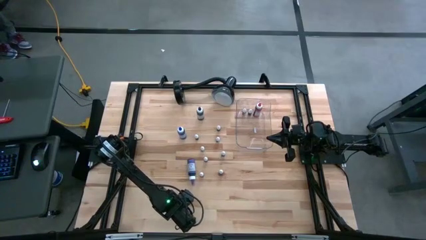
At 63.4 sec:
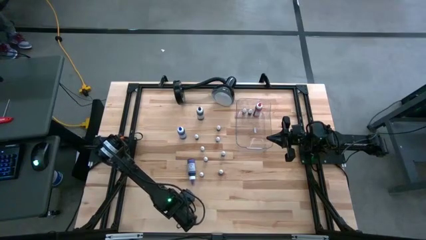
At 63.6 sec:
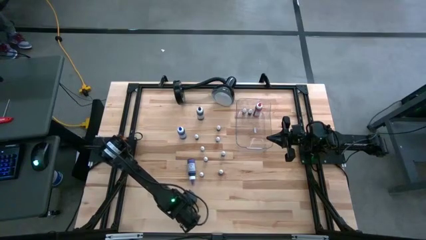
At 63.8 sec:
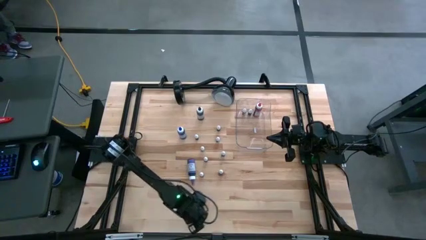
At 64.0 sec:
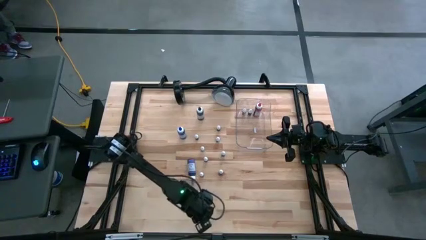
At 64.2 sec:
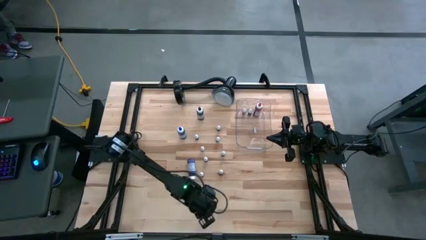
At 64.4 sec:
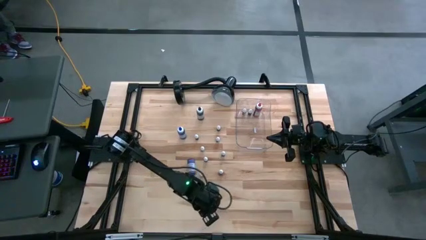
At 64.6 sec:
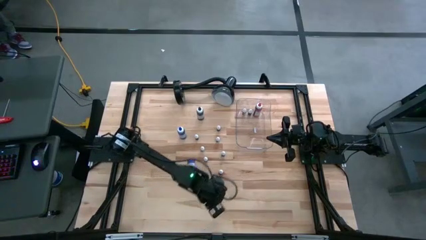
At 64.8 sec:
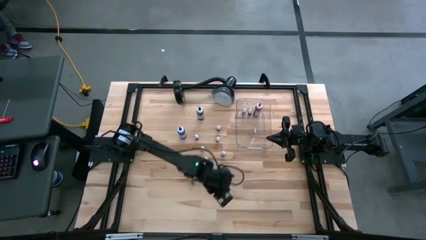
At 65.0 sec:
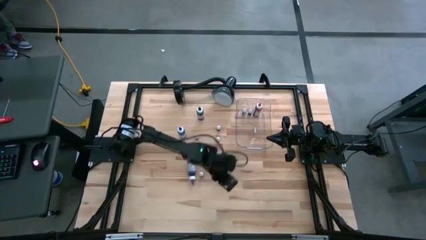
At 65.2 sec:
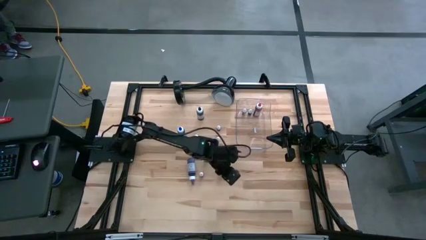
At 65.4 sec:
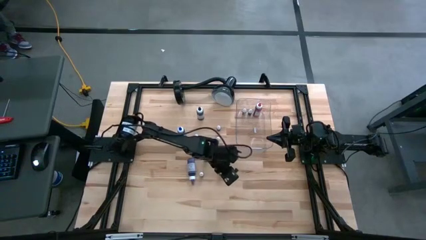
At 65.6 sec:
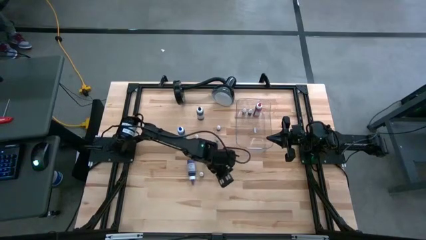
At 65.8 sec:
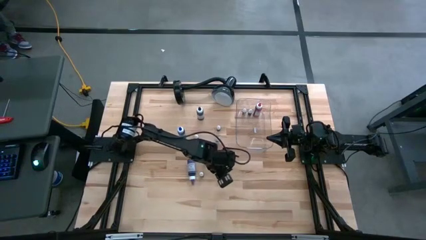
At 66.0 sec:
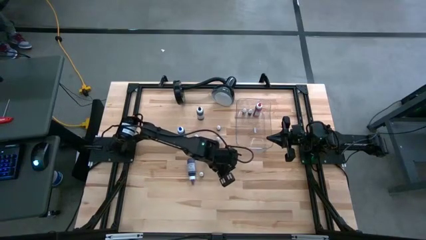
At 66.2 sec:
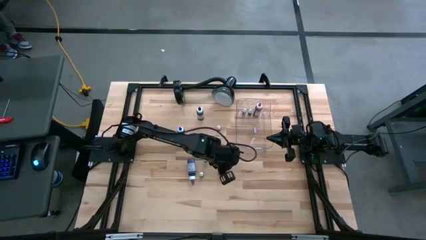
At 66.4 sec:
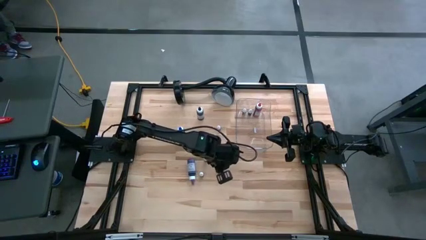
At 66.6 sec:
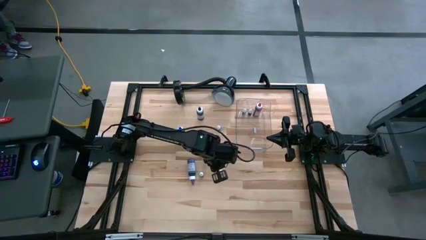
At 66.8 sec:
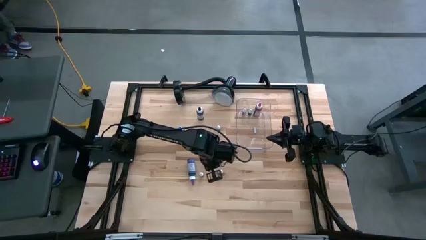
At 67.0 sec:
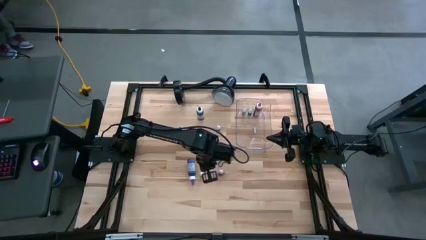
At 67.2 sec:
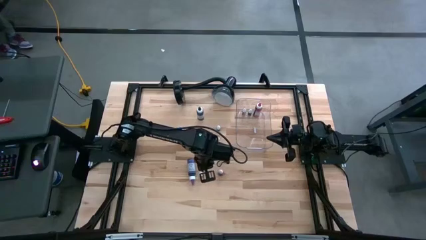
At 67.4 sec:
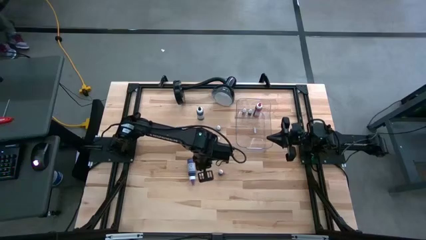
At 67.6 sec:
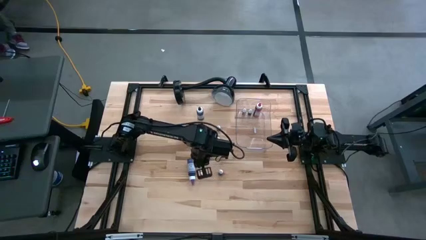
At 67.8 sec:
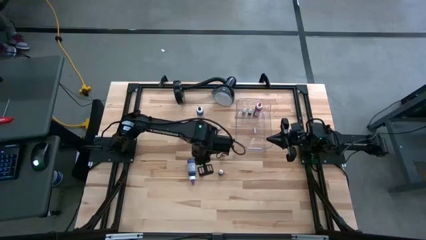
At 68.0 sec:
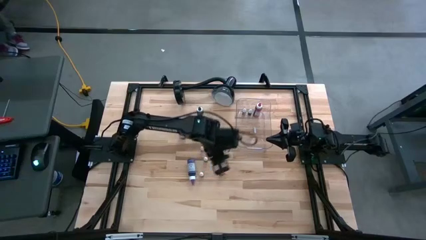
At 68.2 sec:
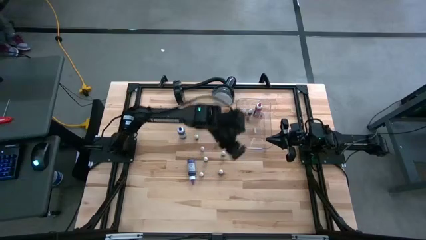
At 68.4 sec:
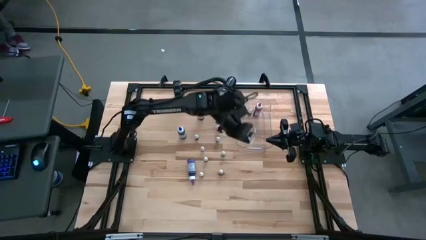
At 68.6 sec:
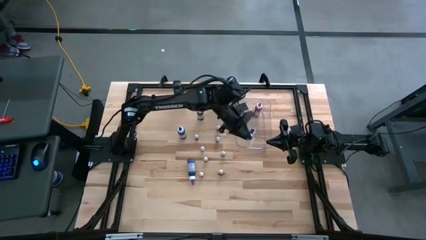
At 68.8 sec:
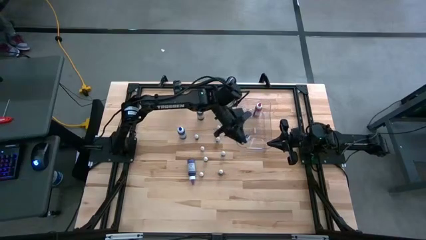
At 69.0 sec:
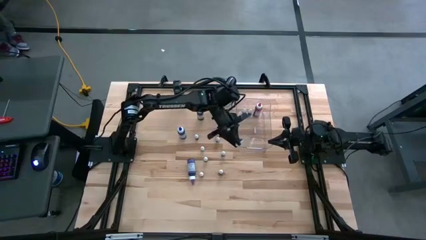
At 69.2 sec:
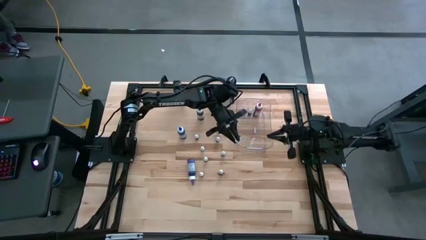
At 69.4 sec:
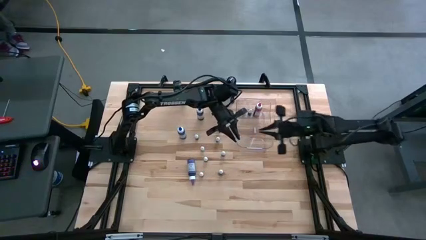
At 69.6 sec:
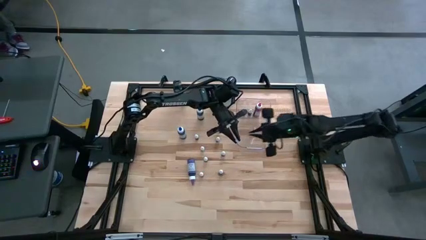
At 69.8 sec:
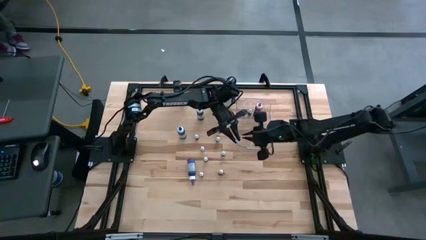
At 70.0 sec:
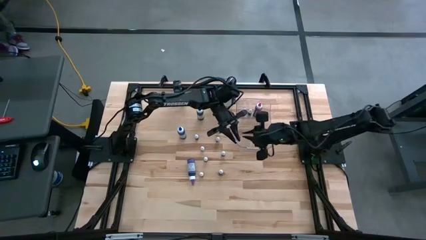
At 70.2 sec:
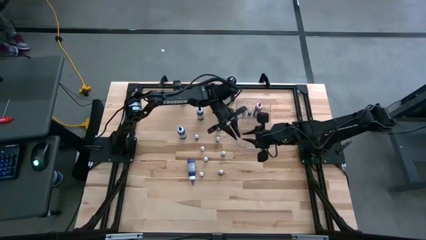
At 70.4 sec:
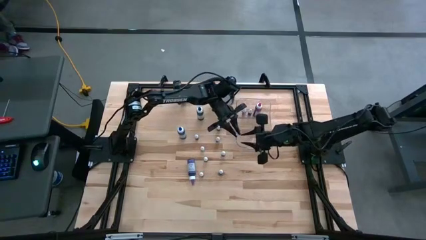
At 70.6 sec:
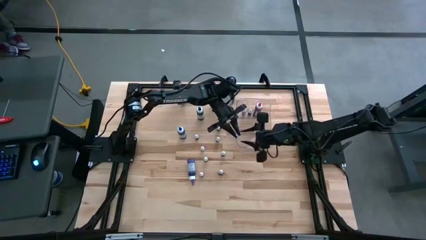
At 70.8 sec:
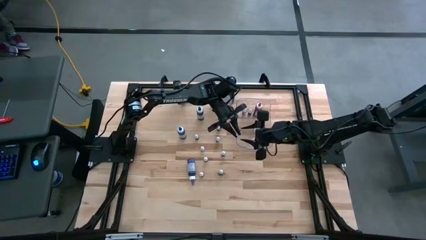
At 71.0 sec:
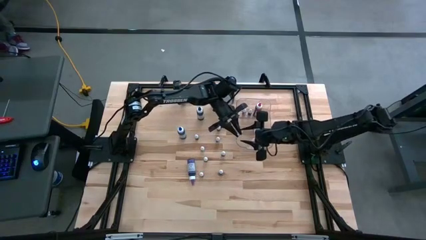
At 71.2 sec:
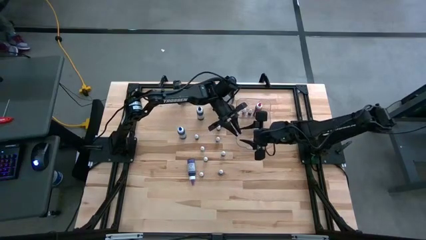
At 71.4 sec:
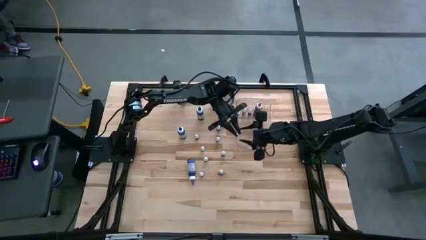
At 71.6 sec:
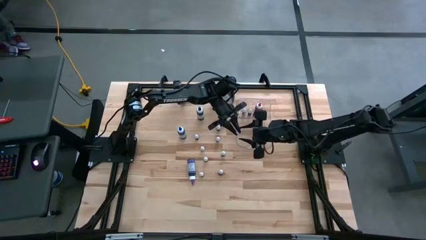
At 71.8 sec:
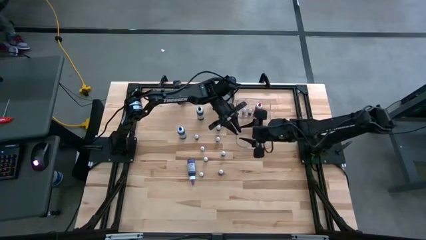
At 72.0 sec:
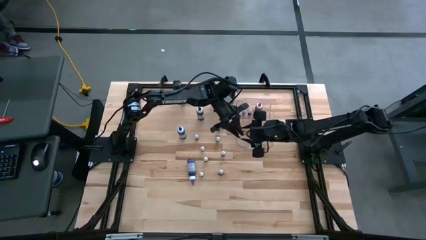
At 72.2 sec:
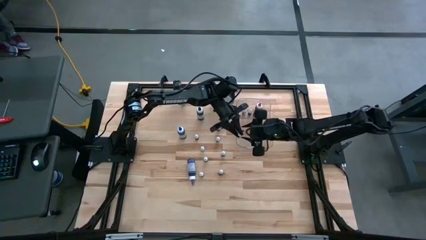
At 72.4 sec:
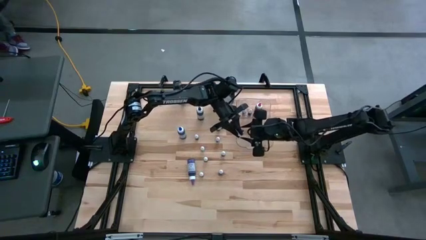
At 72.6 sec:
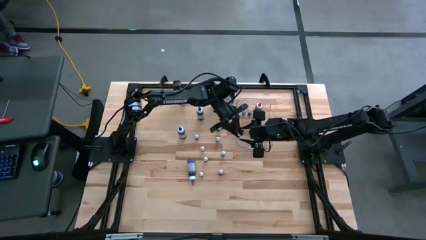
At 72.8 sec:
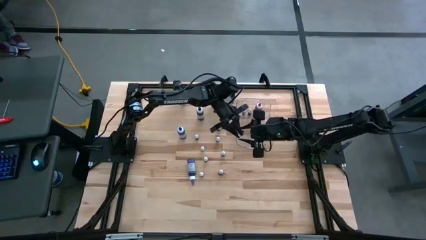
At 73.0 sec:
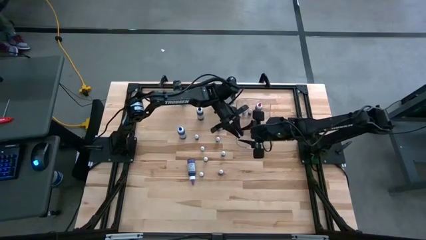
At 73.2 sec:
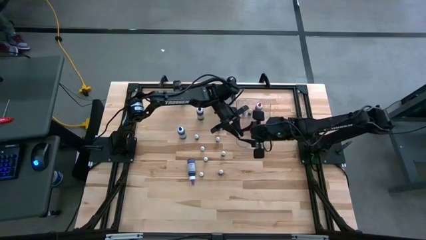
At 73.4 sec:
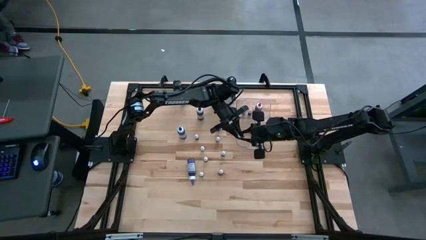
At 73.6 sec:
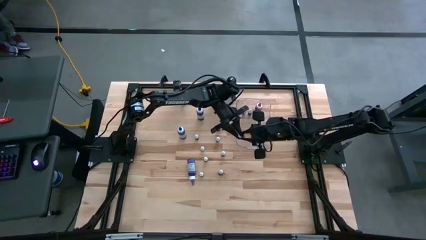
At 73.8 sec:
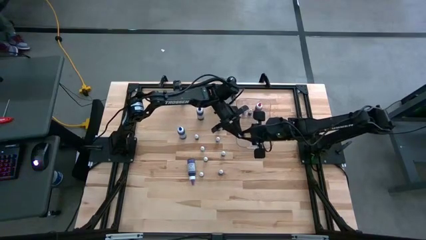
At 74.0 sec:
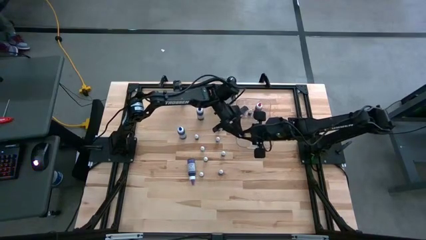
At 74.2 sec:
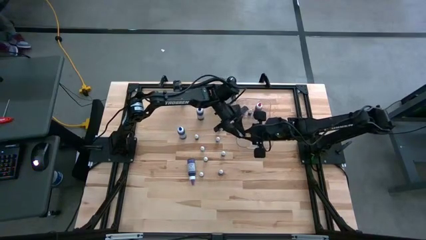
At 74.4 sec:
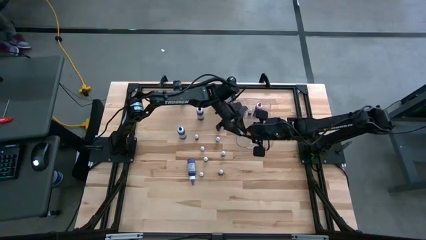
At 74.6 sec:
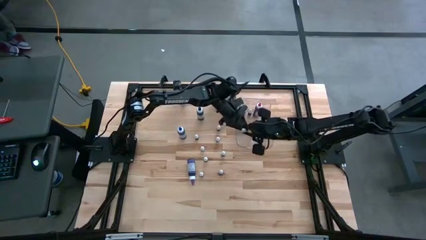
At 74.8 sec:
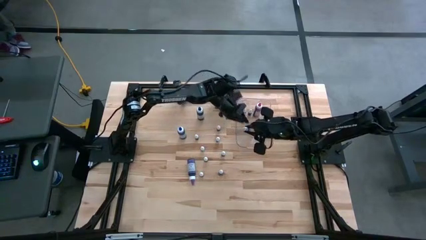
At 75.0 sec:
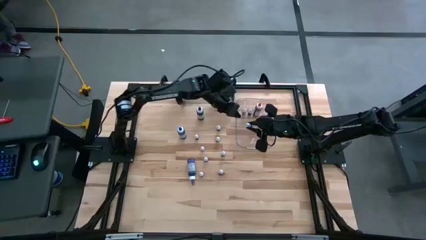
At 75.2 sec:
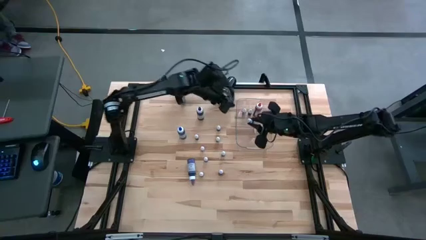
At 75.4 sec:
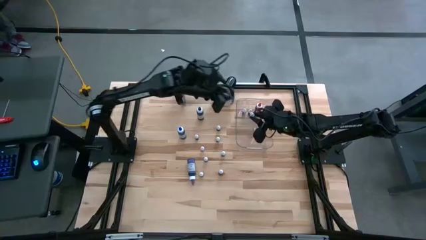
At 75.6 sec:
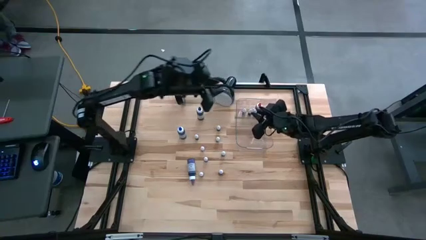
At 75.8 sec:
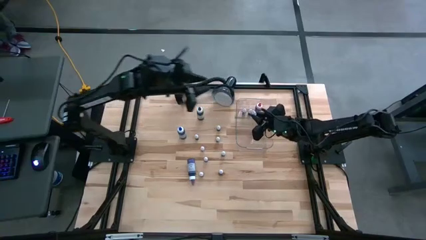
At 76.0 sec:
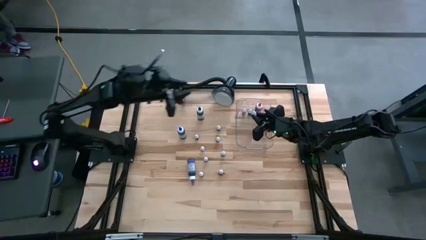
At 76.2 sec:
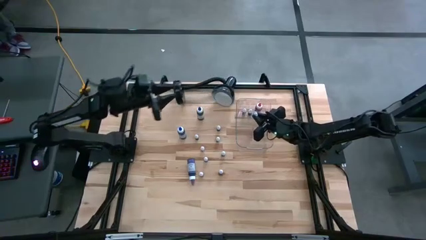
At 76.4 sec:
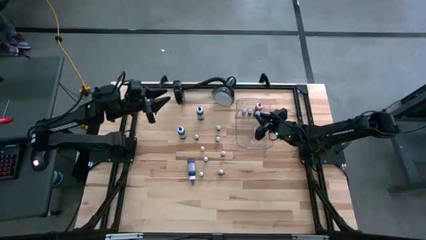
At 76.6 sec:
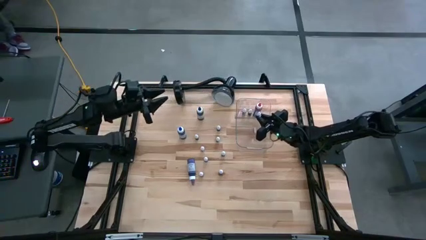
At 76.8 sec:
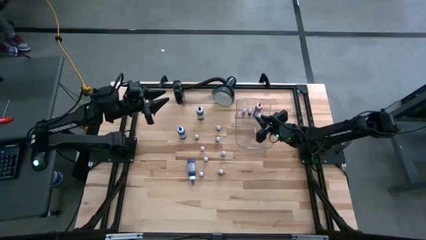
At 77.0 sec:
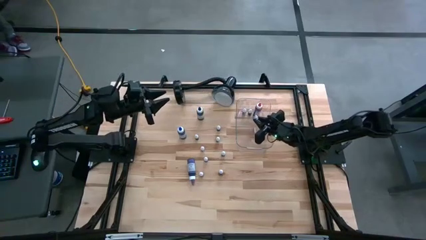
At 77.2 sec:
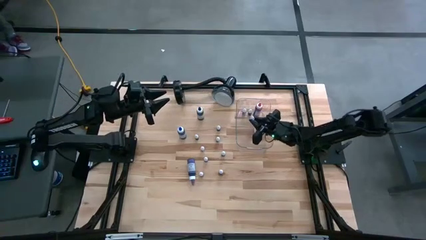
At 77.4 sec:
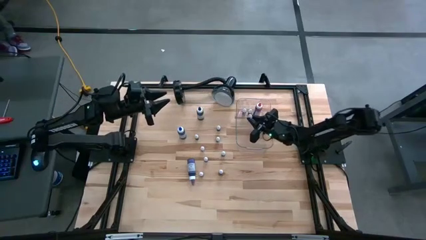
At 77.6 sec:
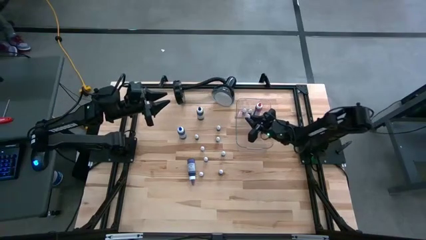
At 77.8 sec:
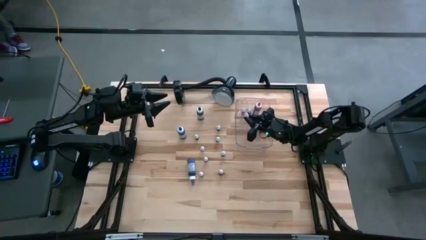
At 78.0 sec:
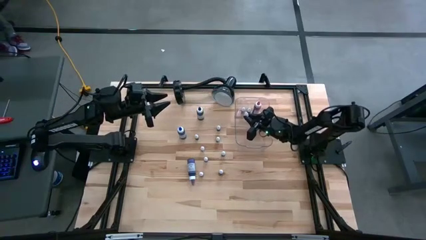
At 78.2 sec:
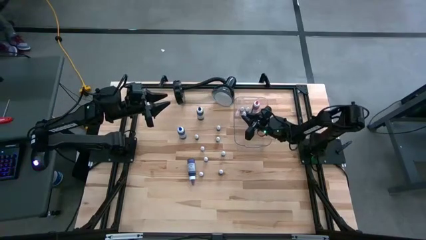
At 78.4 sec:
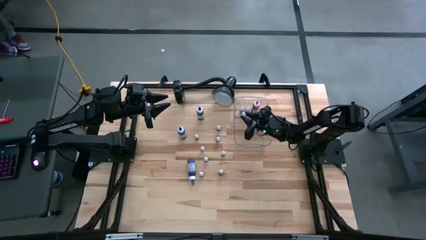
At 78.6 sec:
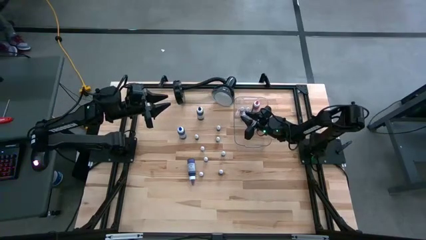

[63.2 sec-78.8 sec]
Task: Pick & Place food coloring
Put the small blue food coloring bottle into the transparent bin
